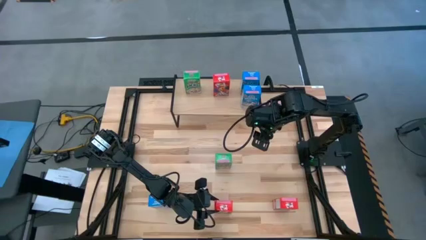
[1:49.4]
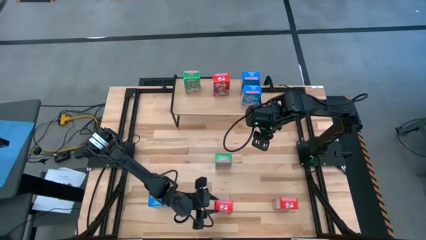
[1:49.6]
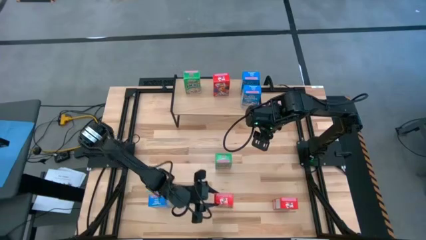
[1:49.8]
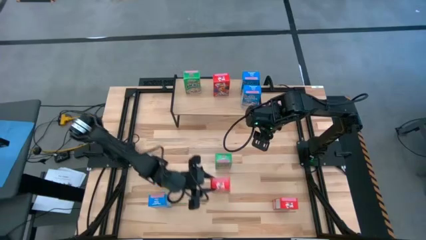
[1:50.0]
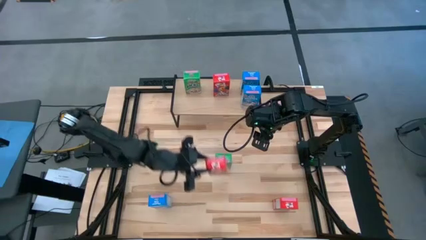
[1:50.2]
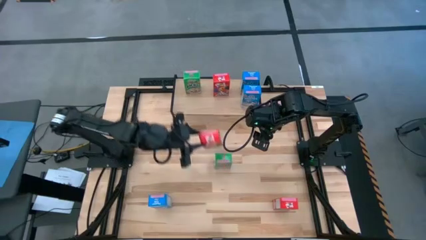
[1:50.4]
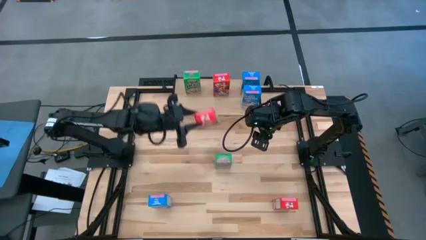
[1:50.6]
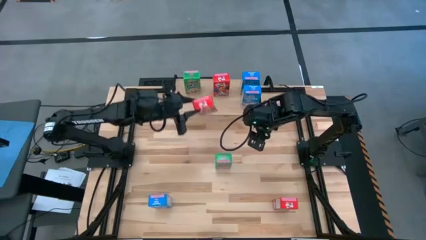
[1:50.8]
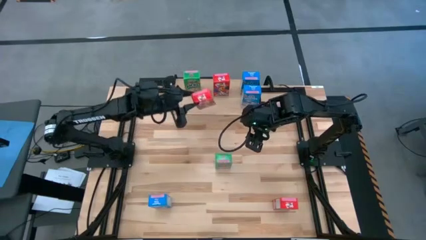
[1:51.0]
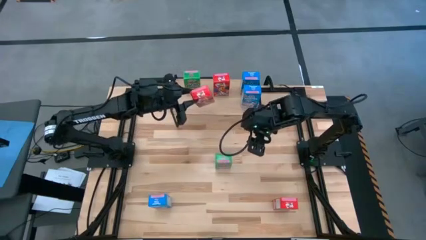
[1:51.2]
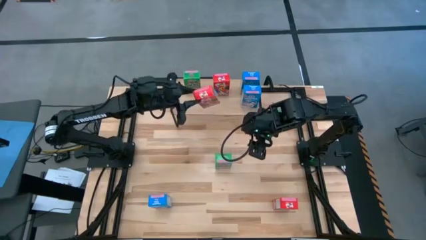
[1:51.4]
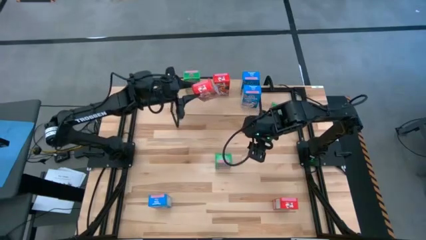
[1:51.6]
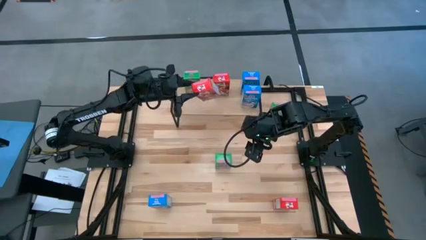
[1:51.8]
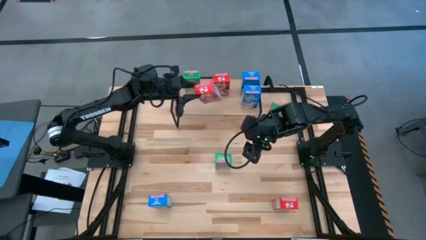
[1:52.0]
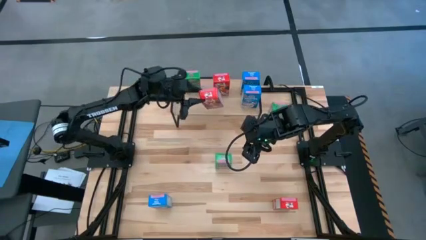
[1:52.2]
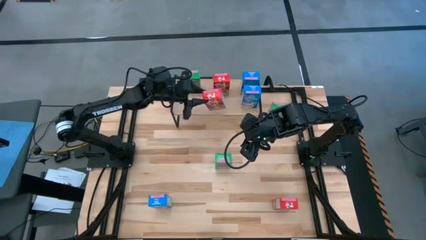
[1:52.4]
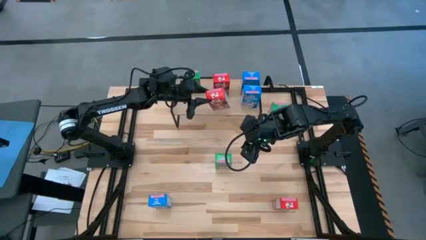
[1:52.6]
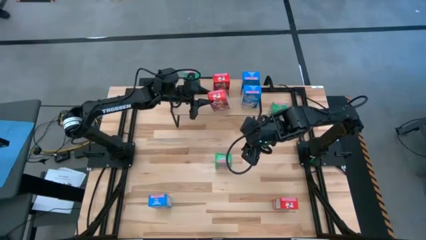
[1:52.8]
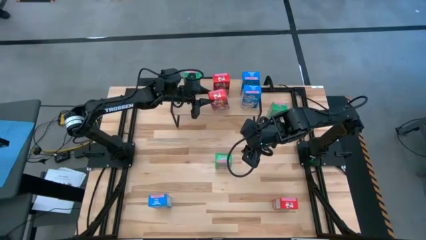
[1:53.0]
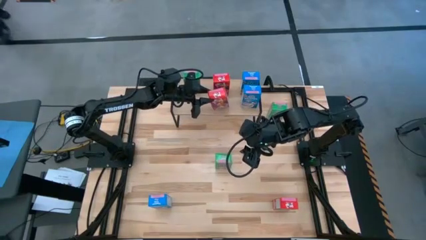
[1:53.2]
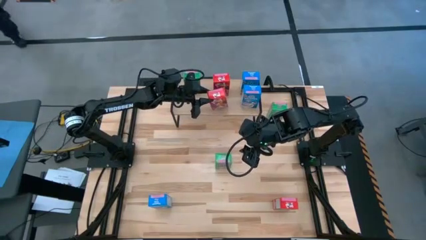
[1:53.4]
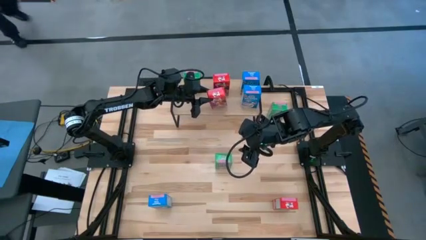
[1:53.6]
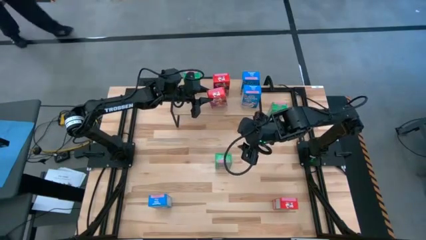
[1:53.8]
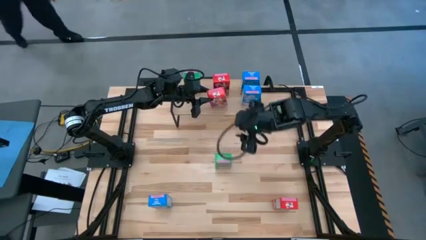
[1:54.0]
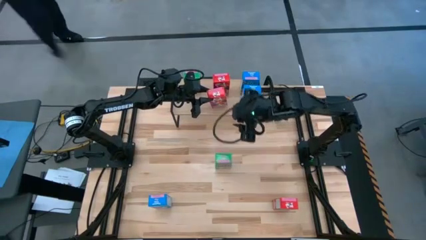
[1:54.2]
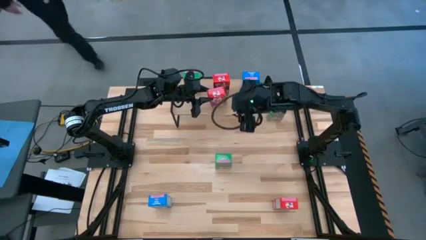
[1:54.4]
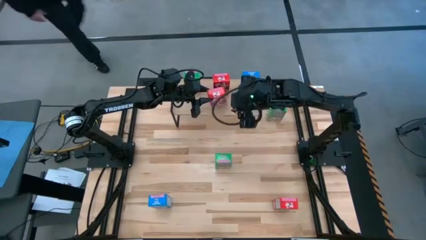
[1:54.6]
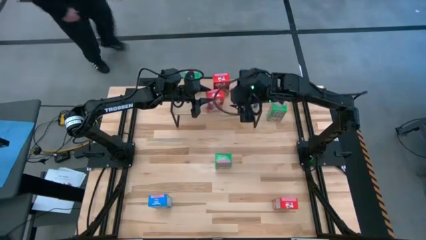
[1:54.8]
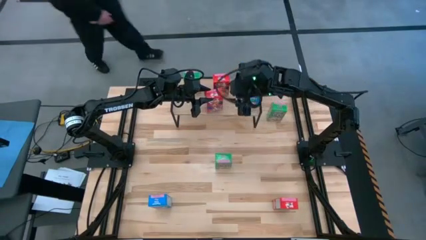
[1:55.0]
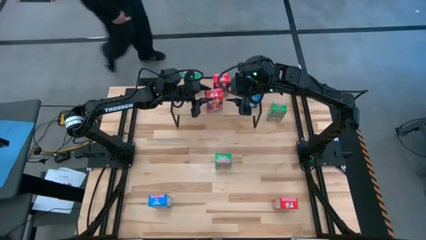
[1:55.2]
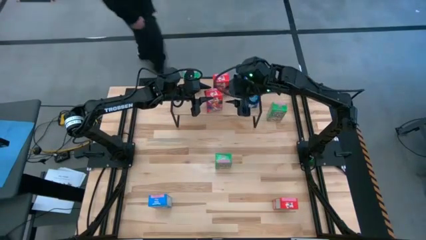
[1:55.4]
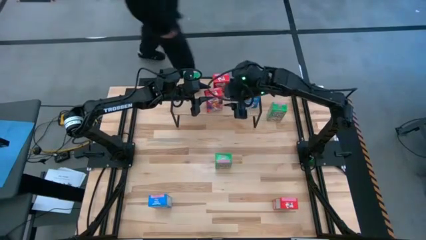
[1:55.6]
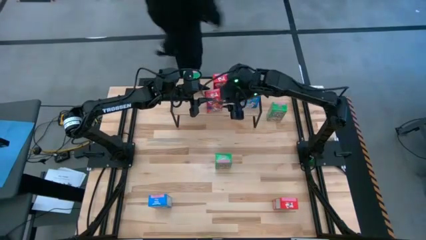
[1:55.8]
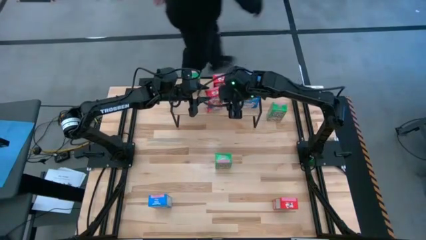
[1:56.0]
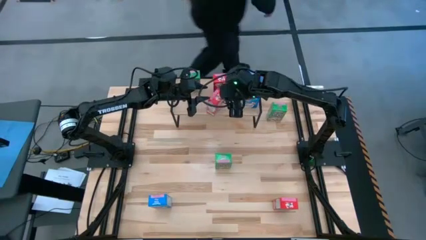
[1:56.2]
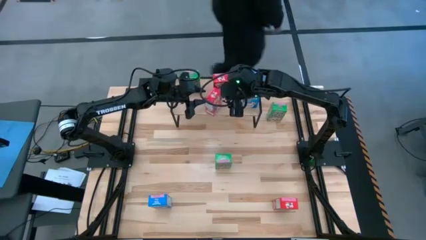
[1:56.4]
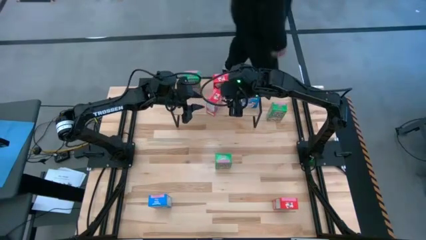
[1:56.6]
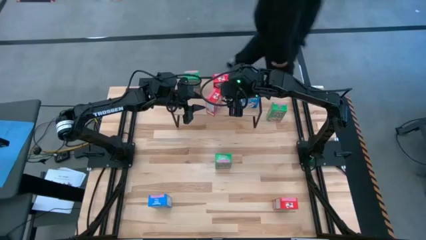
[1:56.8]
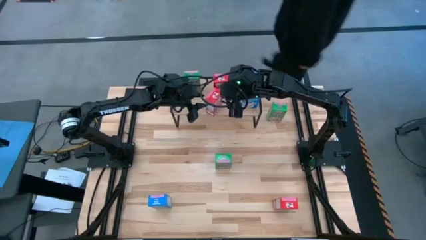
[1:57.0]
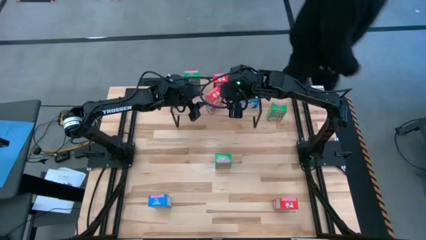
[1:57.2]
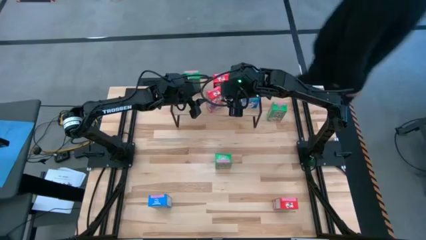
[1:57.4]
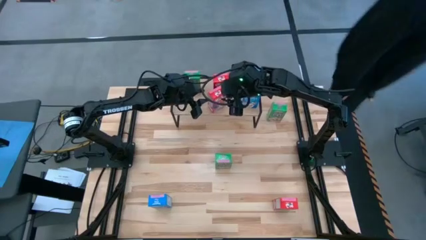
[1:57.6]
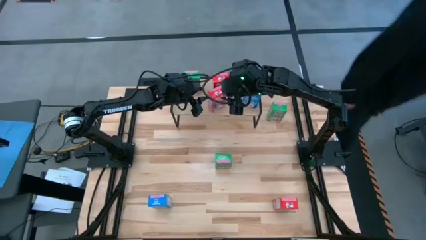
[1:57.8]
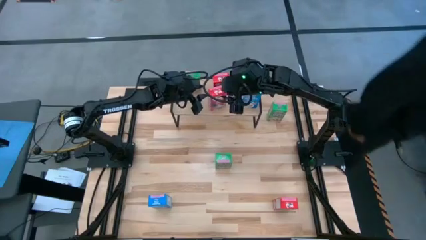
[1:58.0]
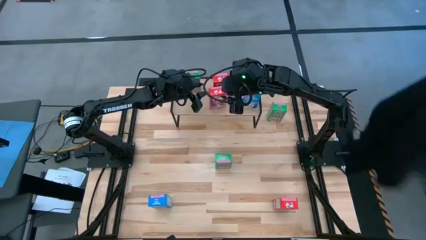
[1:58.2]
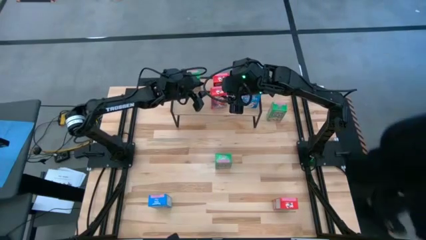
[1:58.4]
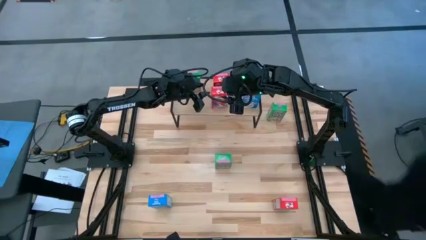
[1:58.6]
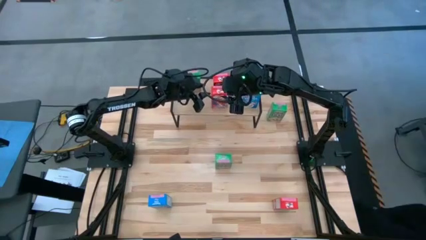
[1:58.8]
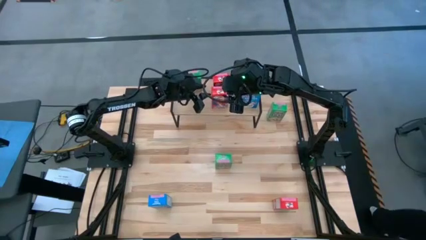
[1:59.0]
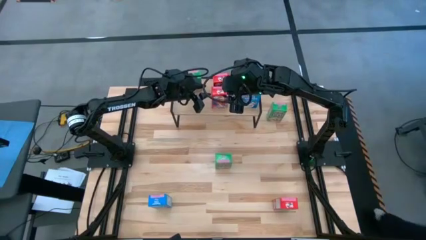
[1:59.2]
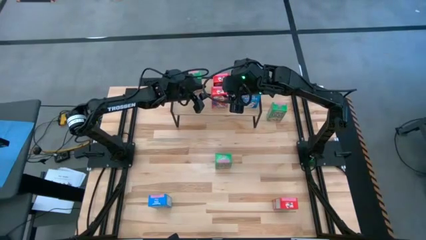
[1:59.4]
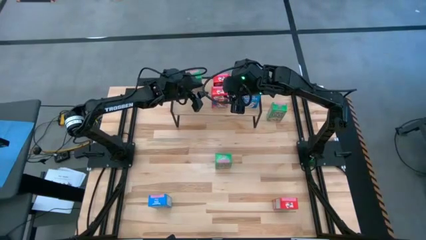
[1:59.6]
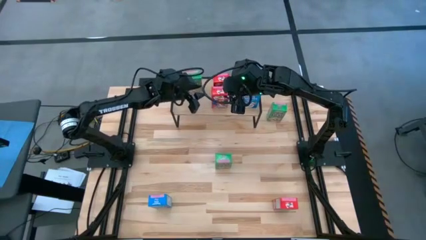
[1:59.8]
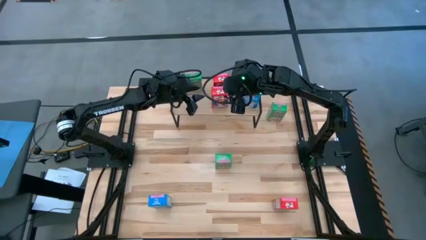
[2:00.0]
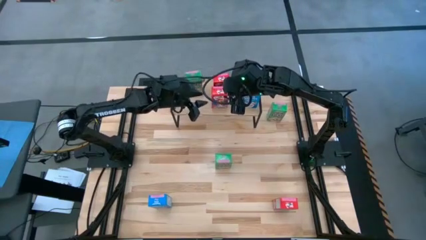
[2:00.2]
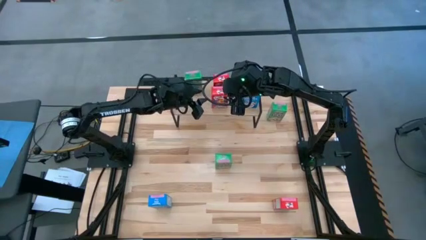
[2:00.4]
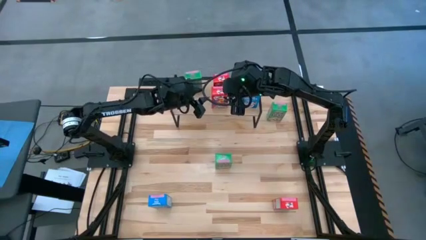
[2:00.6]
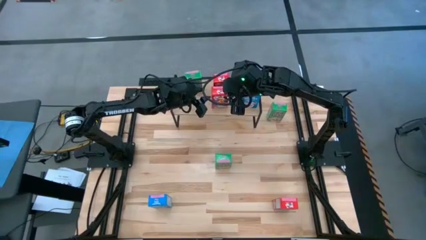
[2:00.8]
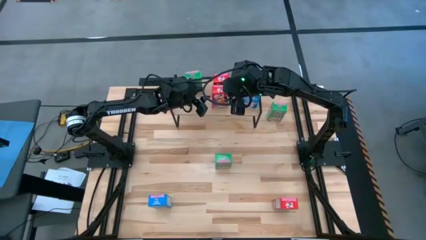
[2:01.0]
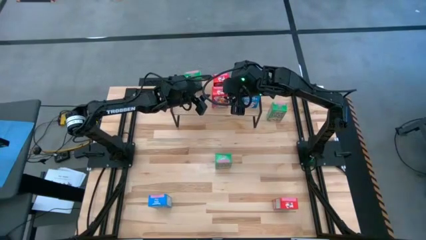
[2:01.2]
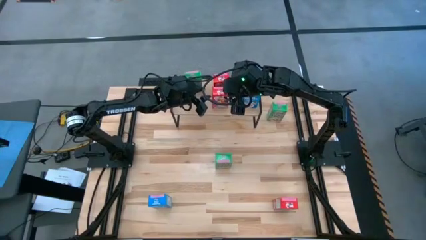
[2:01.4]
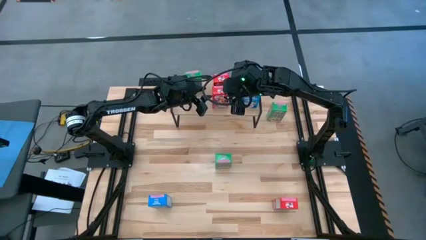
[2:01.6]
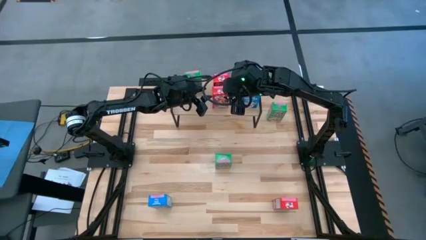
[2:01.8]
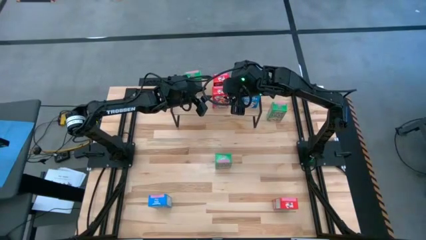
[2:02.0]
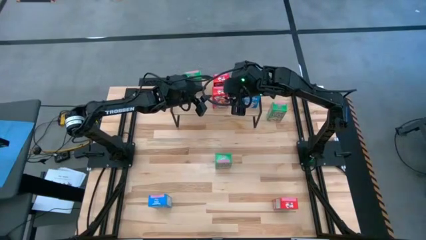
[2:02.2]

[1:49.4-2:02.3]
Task: Stack cereal on shelf
Put the left red cereal box on the shelf aligned with the other red cereal box

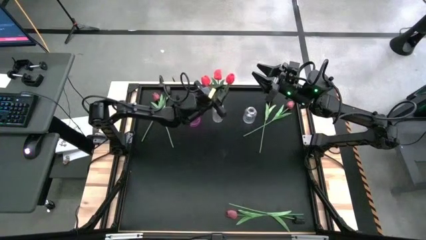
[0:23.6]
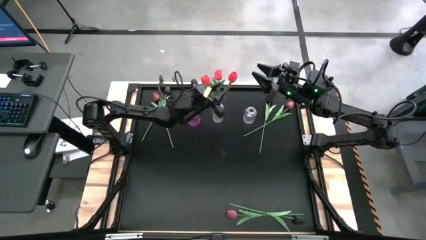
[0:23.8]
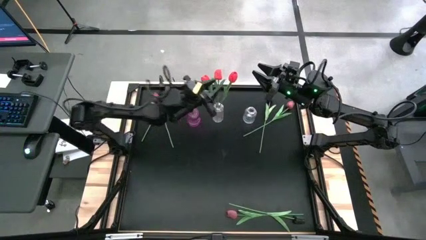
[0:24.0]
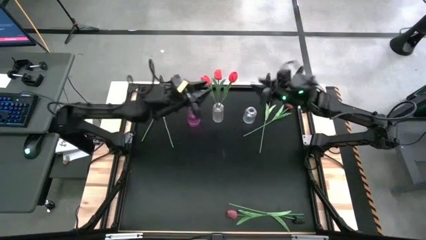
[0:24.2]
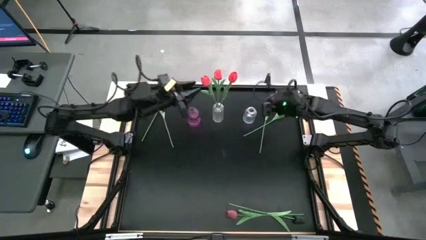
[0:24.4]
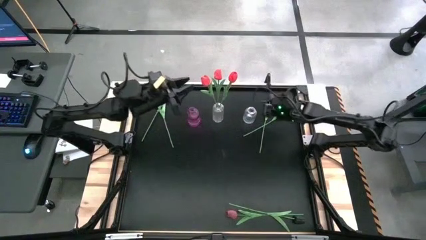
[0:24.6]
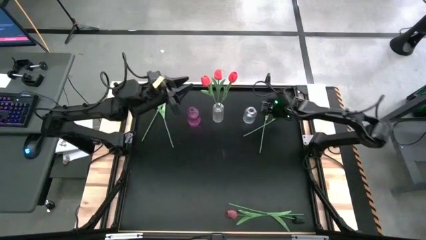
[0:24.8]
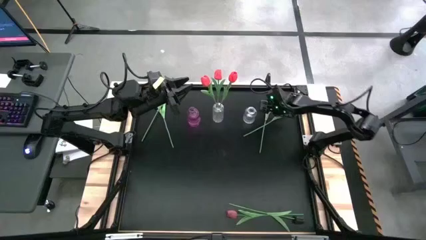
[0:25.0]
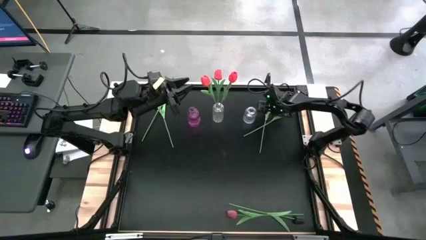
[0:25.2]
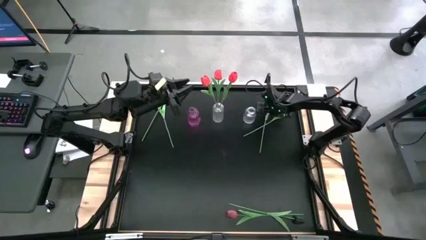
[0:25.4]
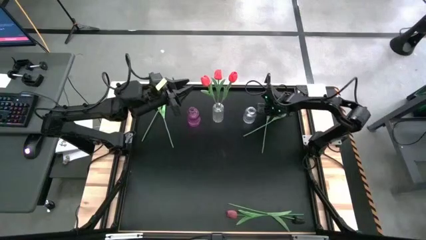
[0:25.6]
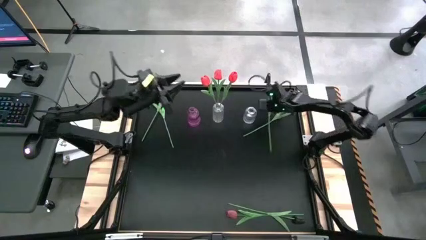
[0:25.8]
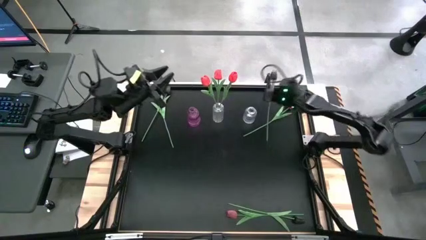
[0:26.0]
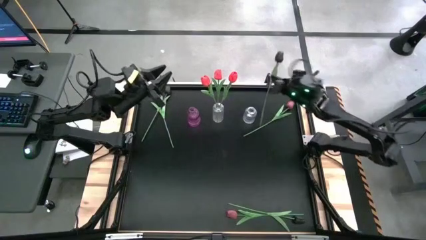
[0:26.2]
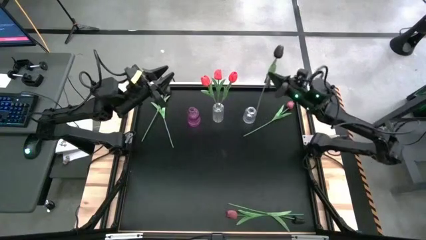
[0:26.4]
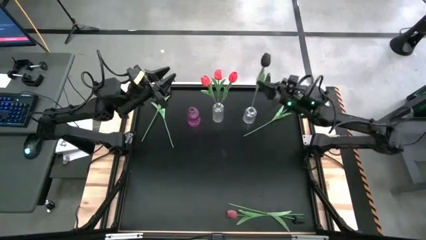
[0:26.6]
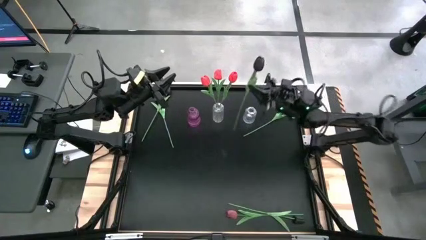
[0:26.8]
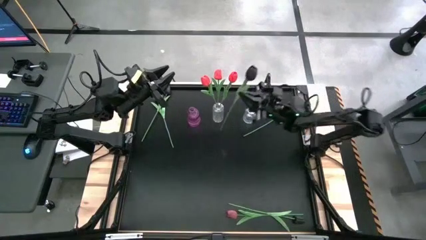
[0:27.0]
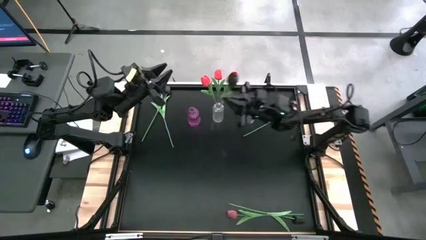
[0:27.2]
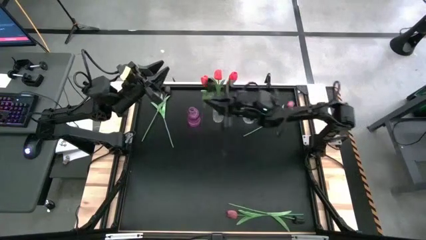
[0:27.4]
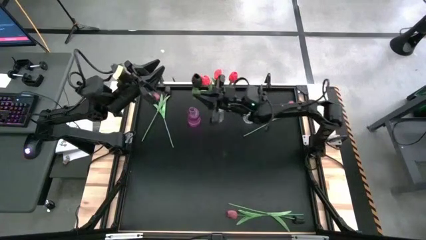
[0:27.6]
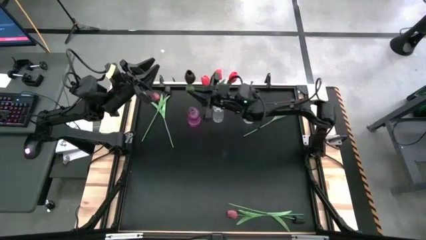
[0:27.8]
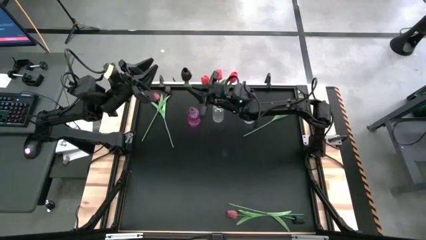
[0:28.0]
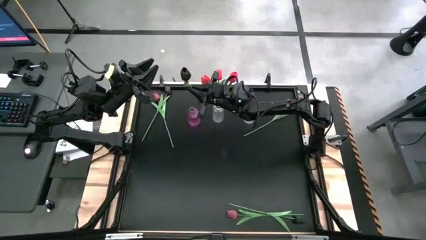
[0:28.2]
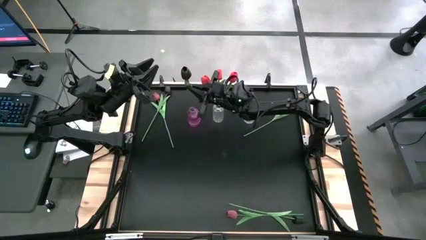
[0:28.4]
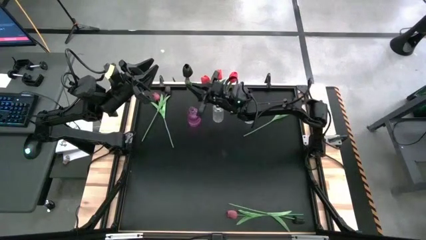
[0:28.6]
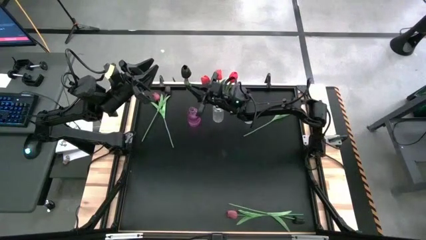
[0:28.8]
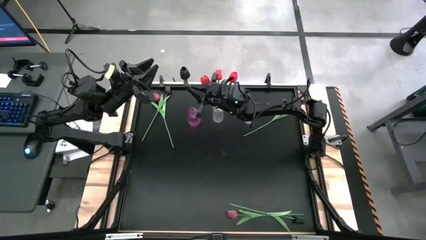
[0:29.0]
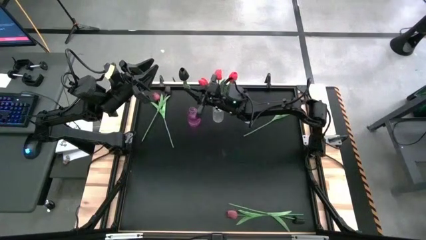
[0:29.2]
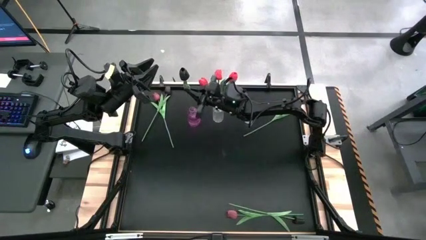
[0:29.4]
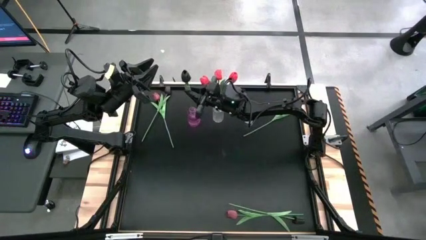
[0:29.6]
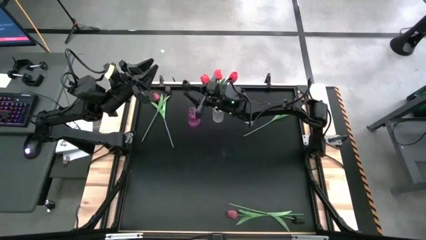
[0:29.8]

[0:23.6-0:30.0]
Task: Sort flowers into vase by color
Put the top right black tulip into the violet flower vase
